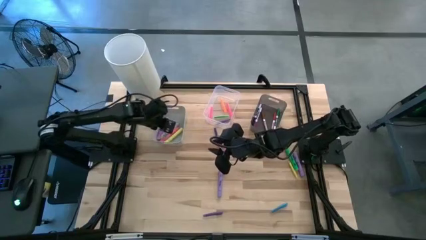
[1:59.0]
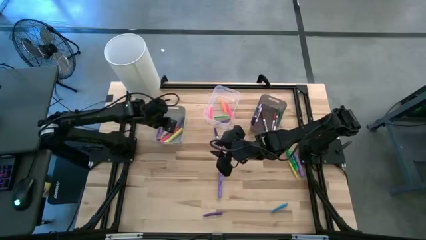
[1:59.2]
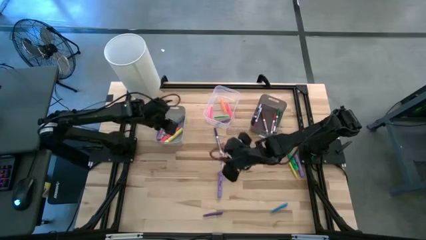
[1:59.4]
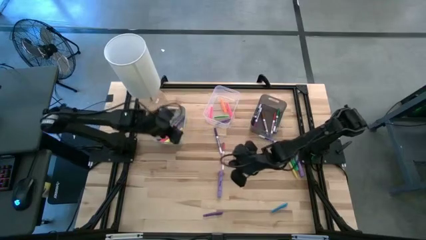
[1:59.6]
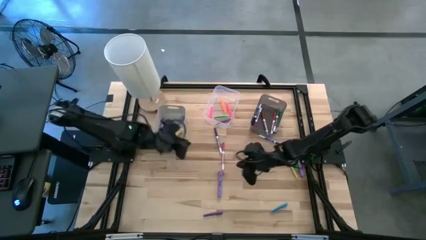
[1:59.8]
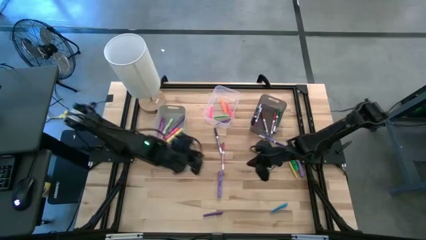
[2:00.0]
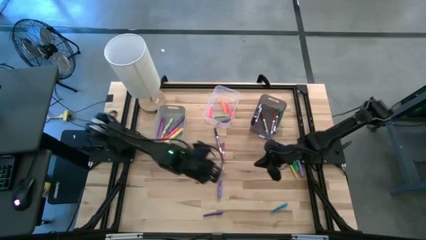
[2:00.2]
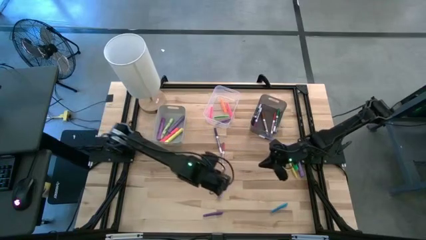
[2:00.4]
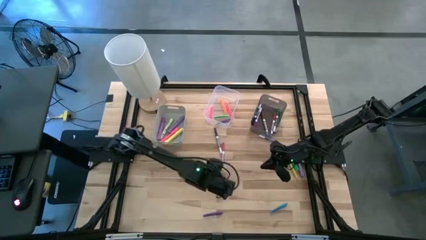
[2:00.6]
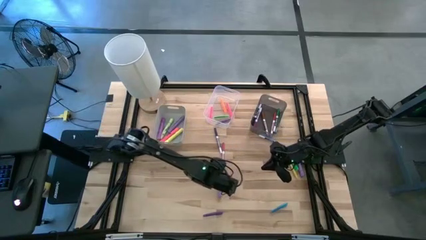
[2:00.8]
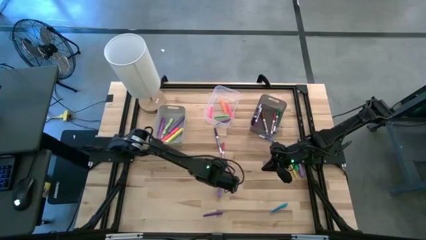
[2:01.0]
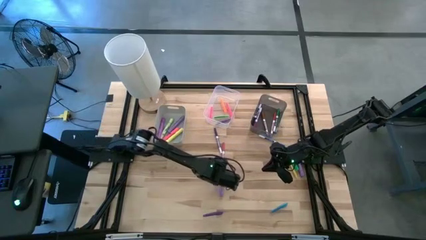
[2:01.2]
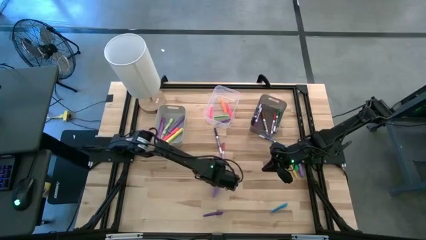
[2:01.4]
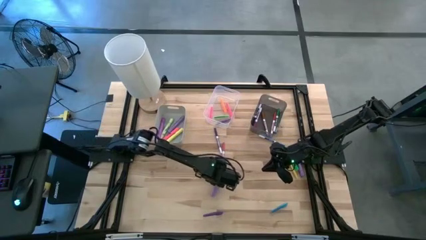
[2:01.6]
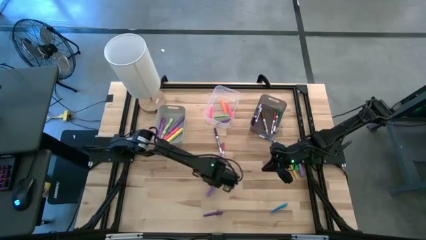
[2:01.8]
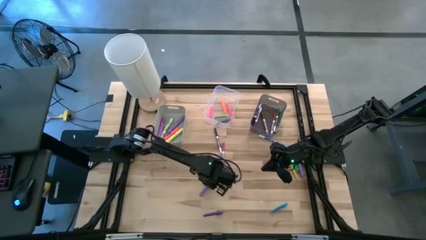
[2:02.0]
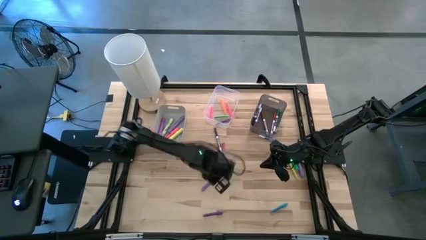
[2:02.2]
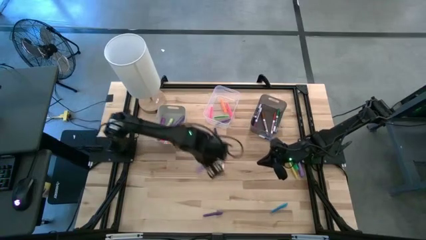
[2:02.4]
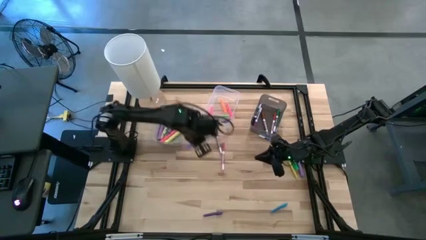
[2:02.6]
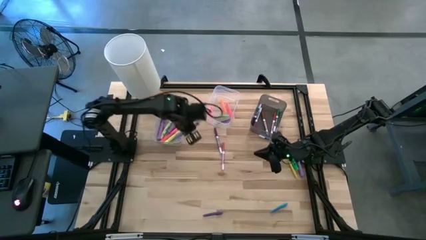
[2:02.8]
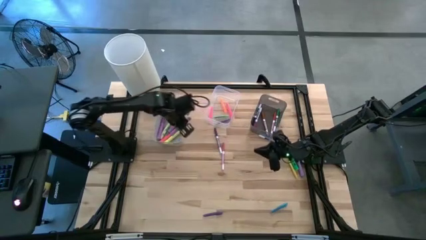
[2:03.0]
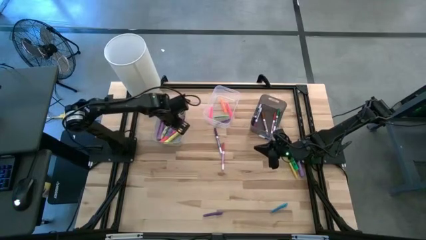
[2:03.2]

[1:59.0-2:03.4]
Task: Pick & Place Markers
Put the blue highlighter into the gray bin

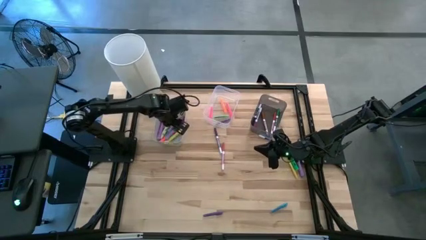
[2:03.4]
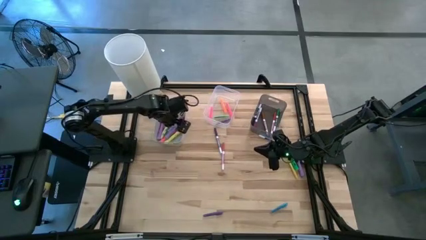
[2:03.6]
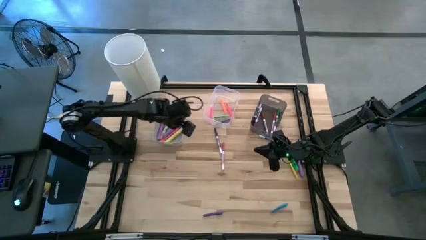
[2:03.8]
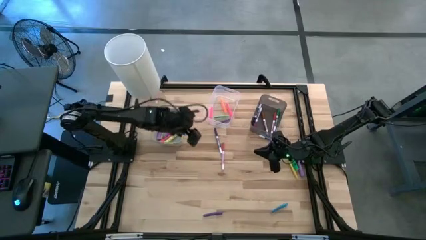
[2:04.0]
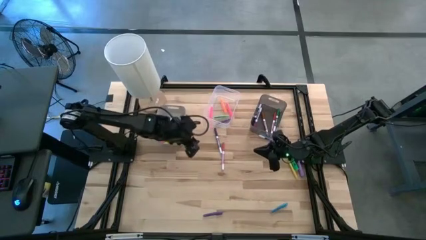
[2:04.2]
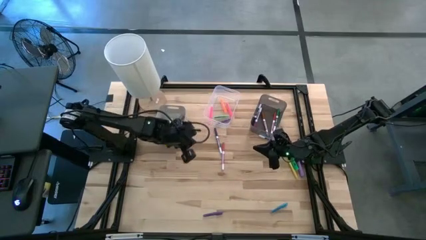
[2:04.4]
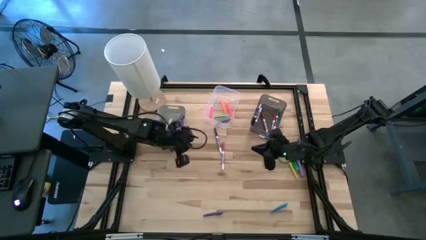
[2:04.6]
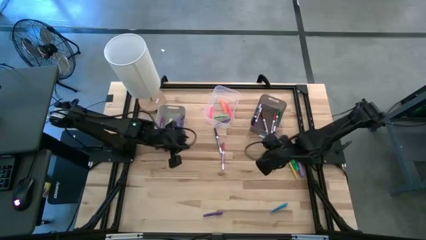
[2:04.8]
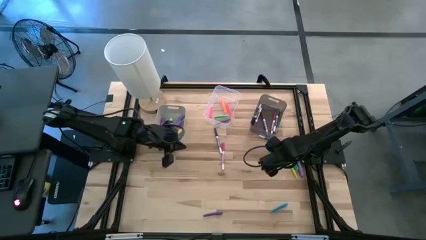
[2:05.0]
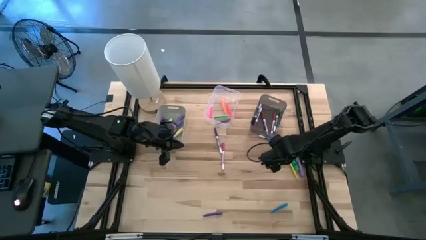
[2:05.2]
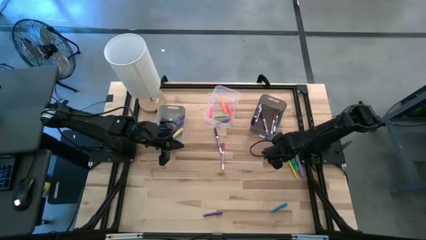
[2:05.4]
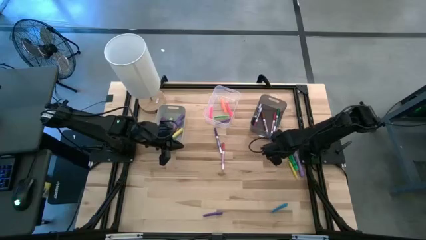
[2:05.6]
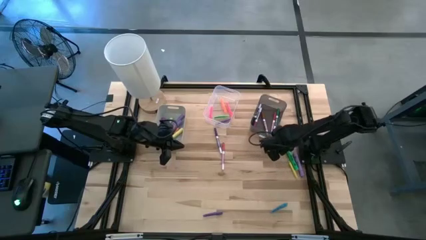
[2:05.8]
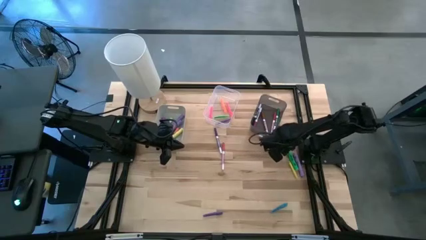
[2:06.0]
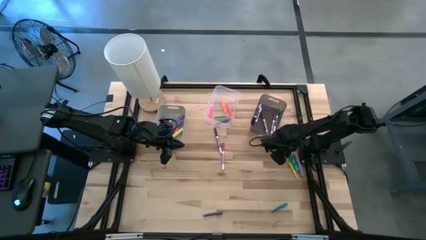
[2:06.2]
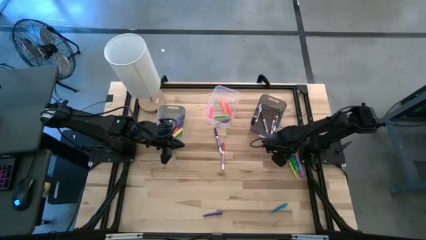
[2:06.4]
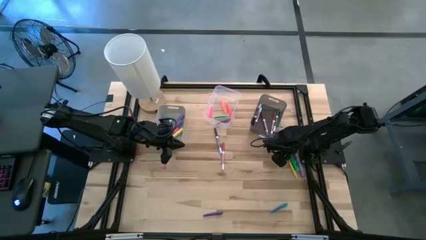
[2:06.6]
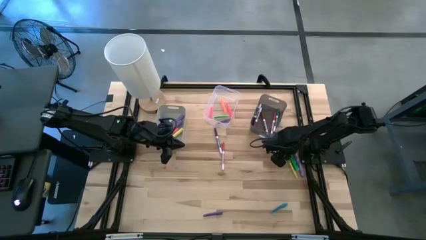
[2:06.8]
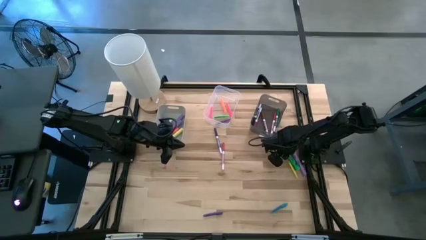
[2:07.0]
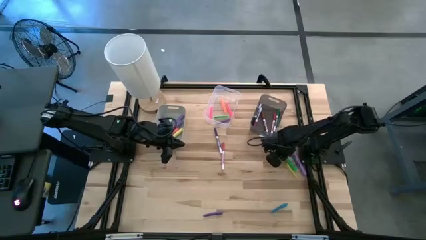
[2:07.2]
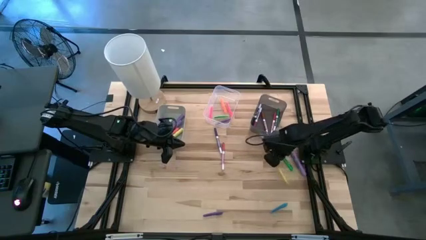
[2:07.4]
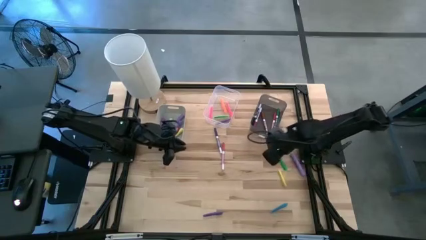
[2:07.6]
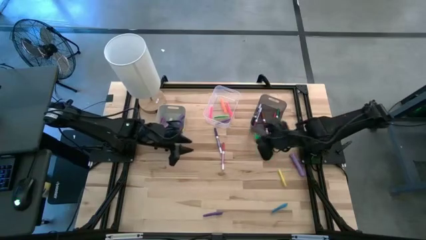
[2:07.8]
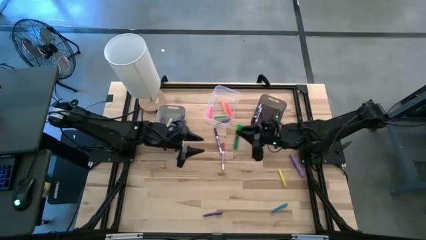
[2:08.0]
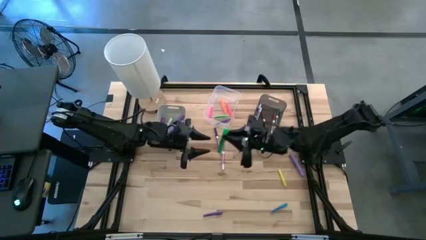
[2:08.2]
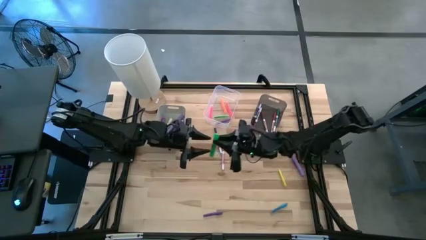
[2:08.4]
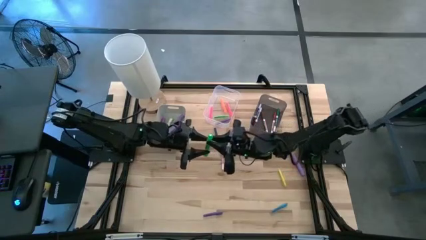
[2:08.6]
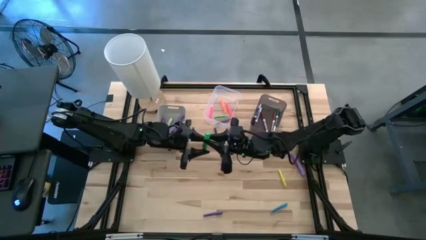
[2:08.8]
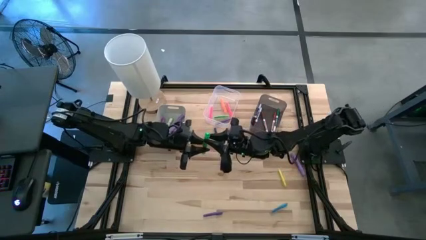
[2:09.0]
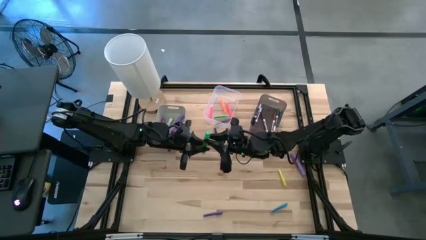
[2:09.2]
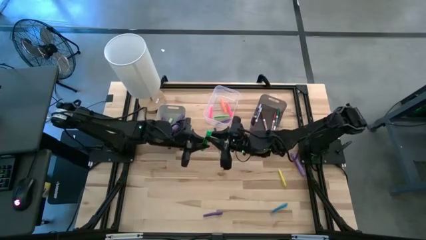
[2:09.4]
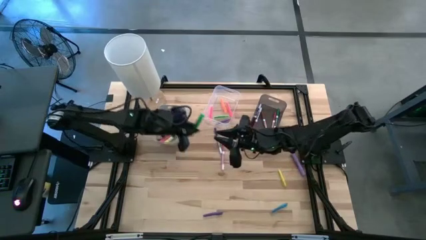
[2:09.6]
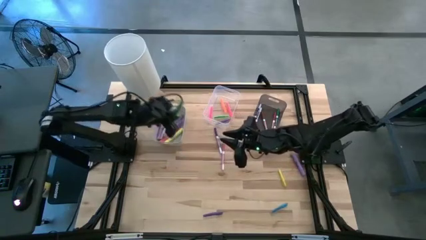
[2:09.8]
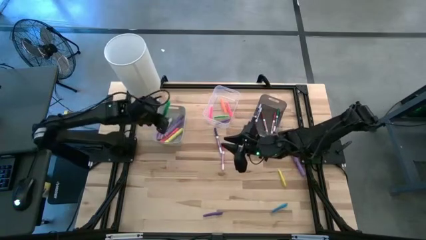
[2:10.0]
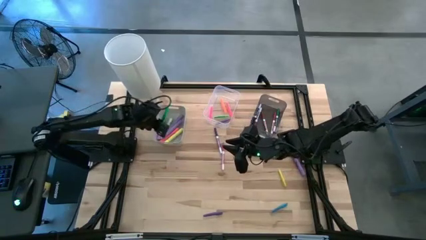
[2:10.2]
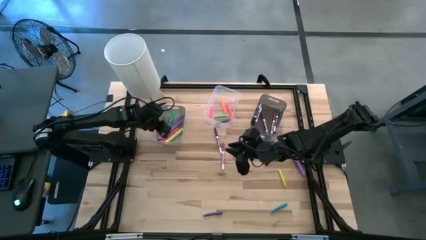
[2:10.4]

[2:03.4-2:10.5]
Put the green highlighter into the gray bin

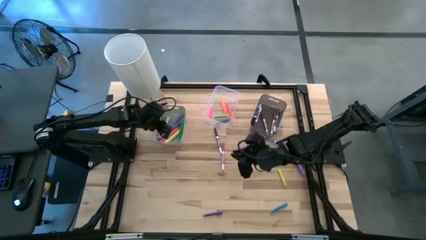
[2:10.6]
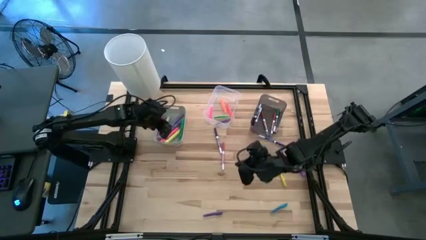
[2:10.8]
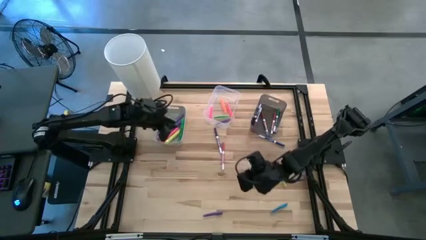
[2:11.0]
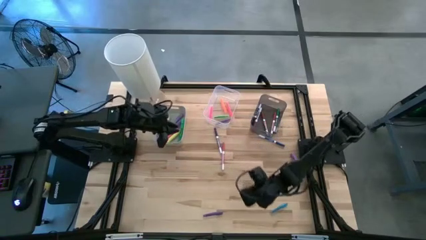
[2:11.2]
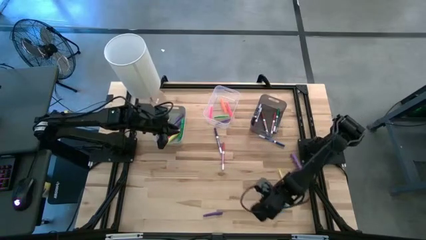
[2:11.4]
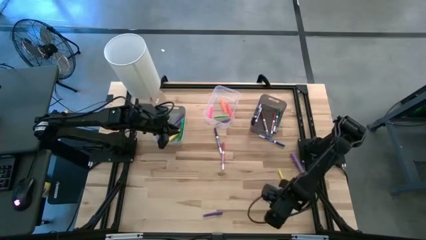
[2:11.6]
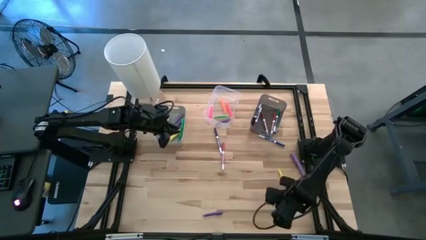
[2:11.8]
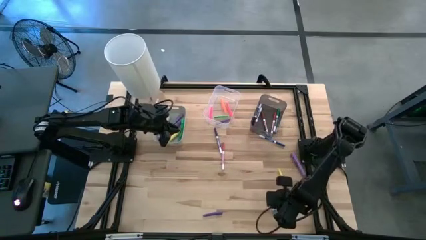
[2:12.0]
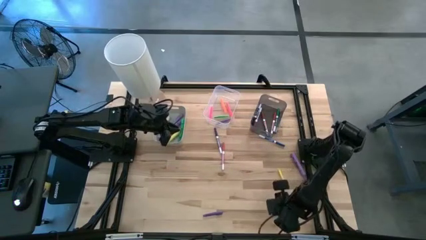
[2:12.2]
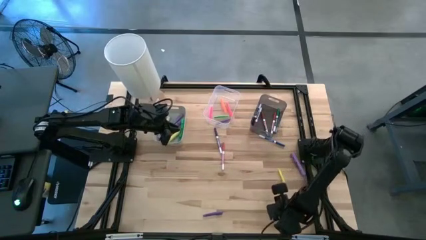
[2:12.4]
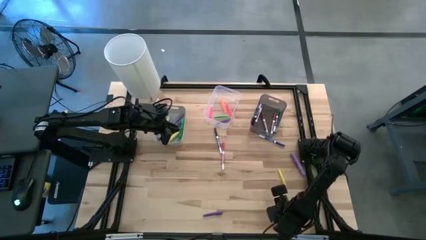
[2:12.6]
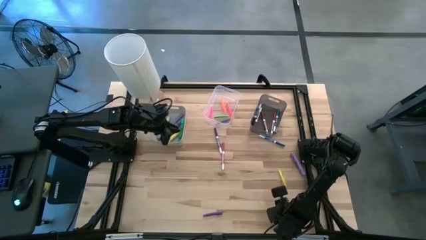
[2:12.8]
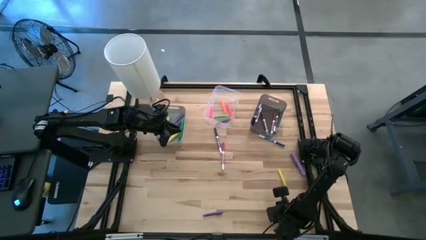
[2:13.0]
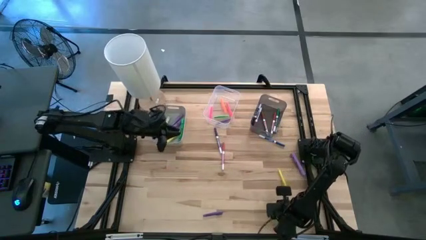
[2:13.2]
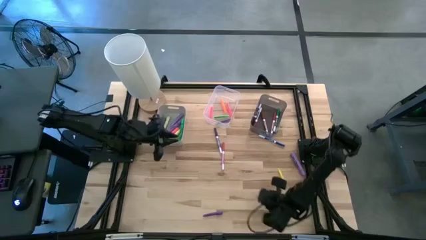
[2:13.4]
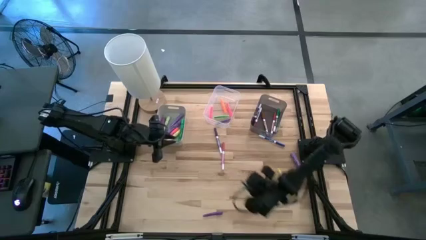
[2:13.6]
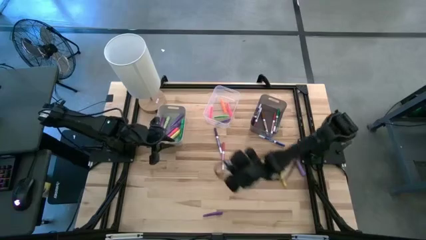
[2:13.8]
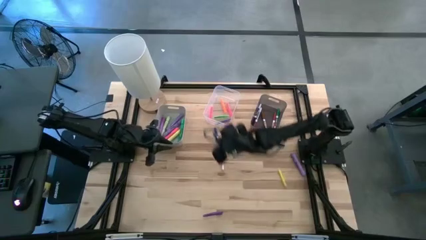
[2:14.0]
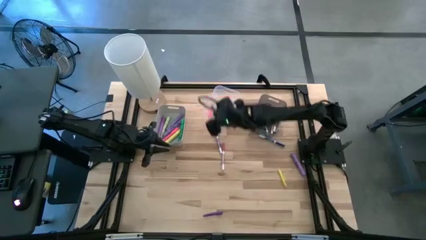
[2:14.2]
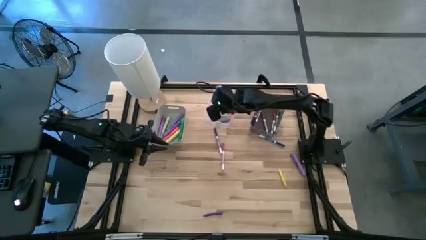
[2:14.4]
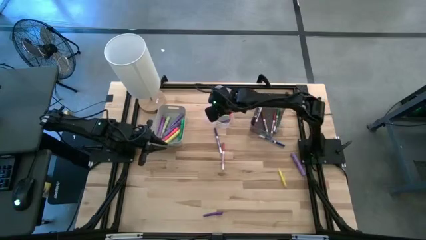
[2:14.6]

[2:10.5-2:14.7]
Put the blue pen into the transparent bin
